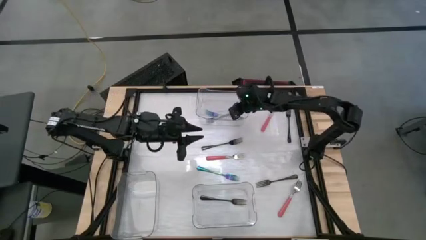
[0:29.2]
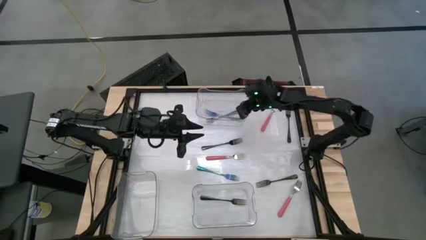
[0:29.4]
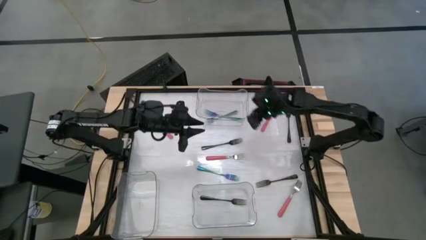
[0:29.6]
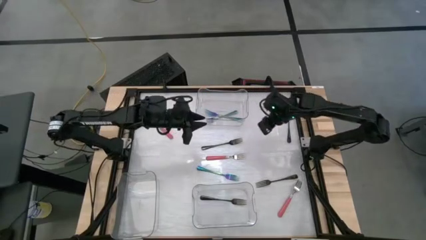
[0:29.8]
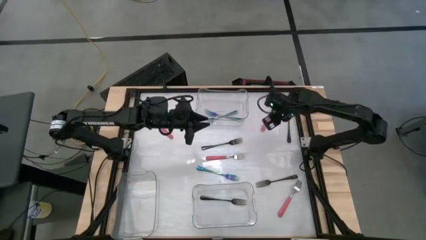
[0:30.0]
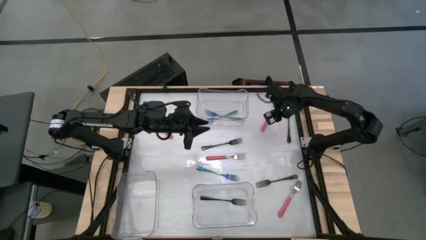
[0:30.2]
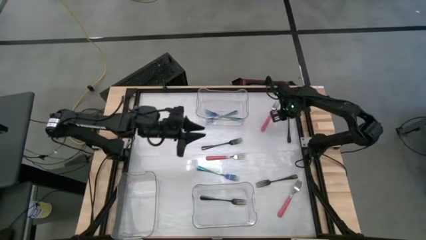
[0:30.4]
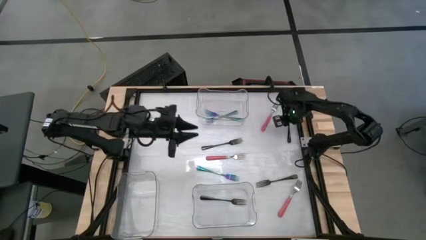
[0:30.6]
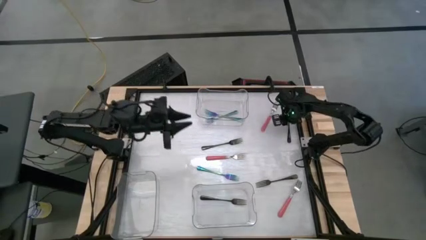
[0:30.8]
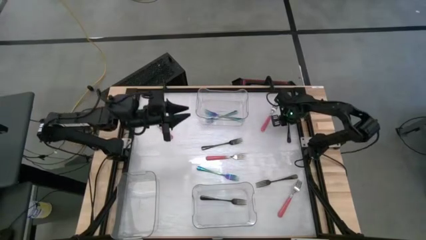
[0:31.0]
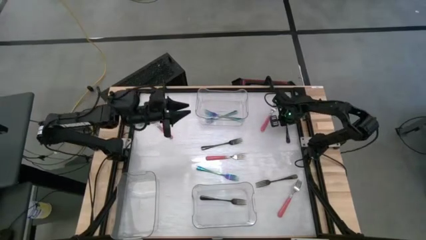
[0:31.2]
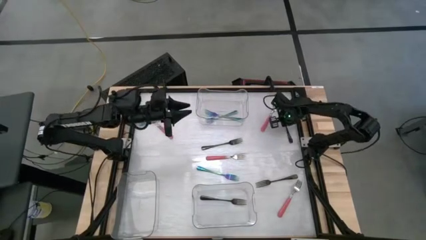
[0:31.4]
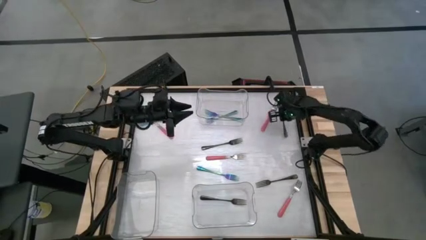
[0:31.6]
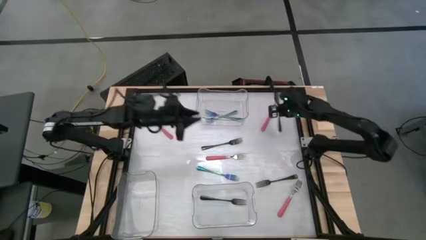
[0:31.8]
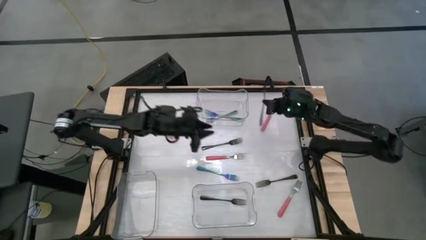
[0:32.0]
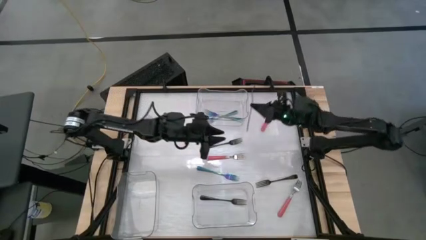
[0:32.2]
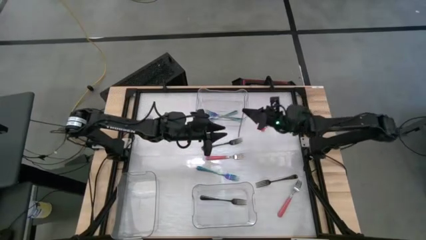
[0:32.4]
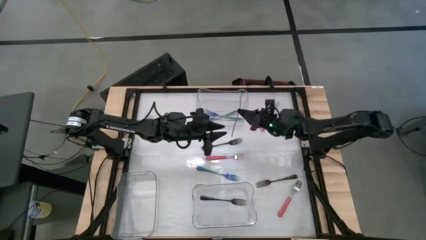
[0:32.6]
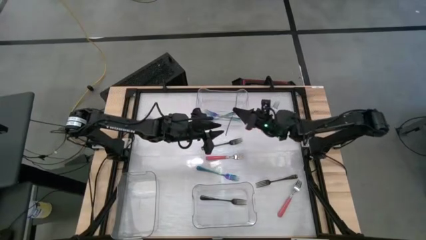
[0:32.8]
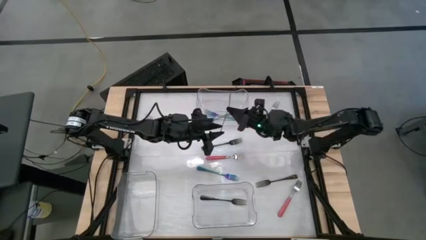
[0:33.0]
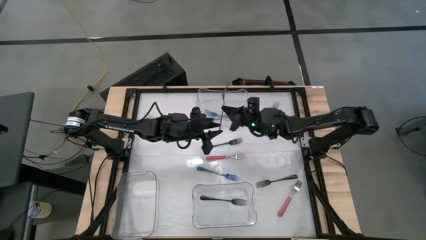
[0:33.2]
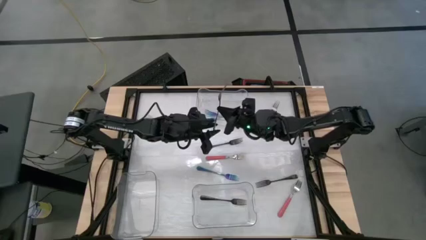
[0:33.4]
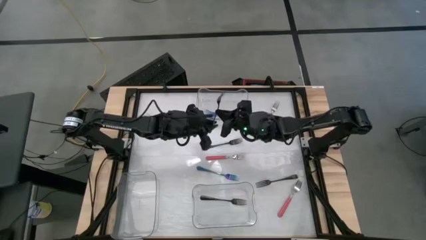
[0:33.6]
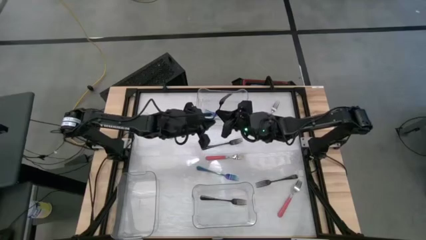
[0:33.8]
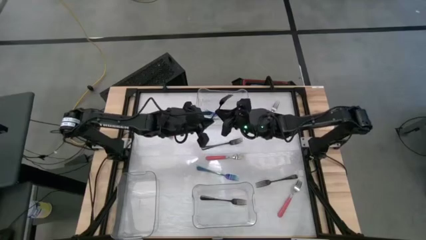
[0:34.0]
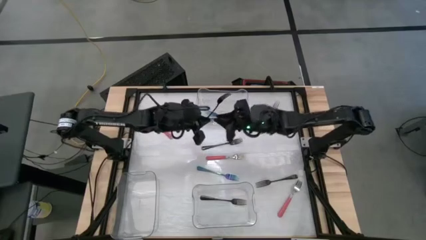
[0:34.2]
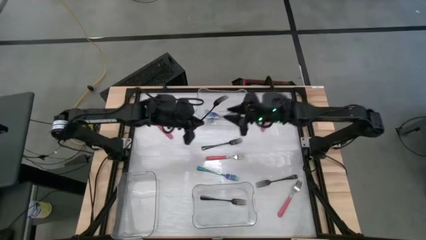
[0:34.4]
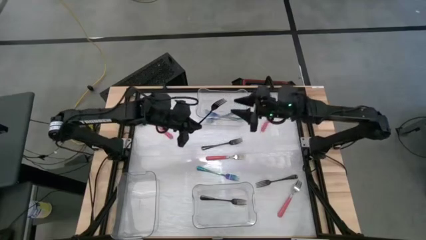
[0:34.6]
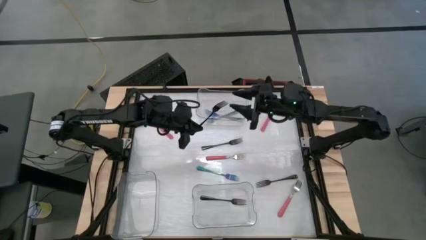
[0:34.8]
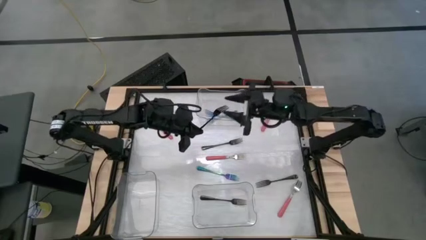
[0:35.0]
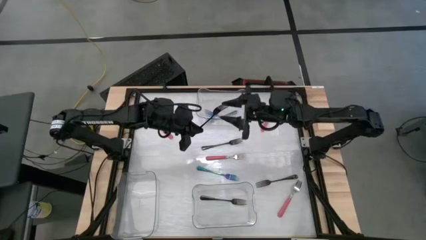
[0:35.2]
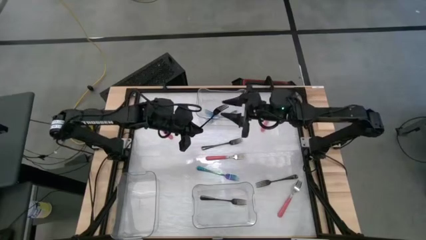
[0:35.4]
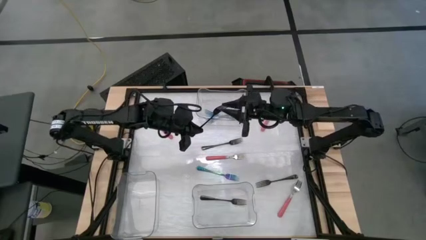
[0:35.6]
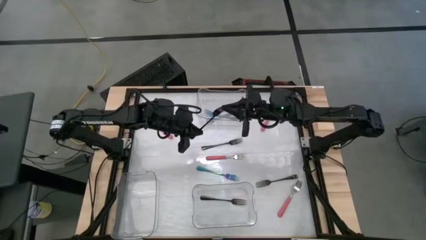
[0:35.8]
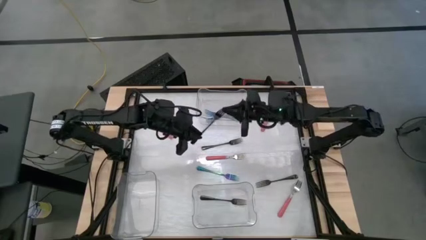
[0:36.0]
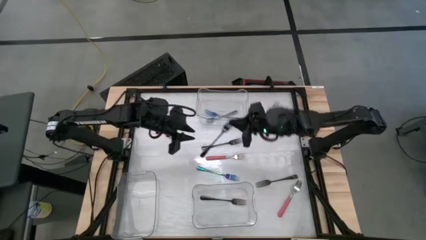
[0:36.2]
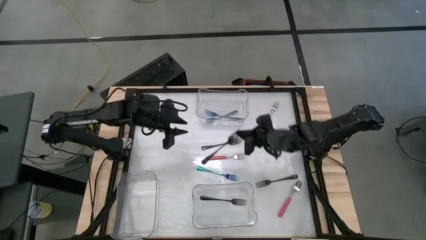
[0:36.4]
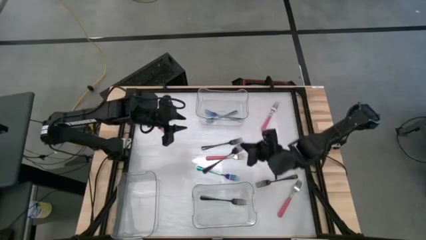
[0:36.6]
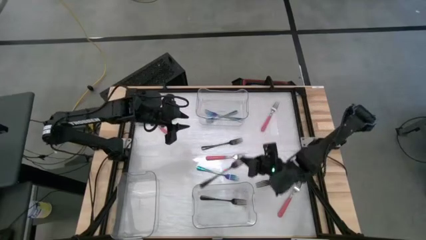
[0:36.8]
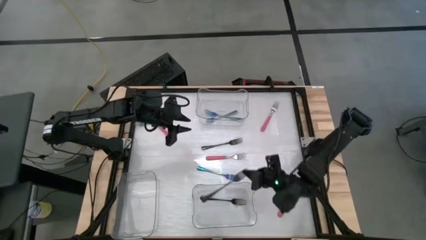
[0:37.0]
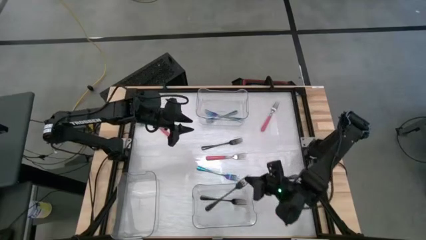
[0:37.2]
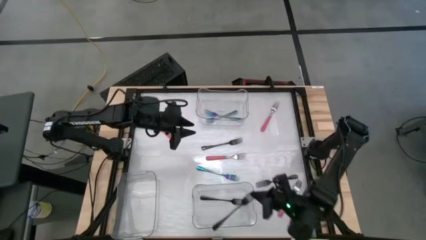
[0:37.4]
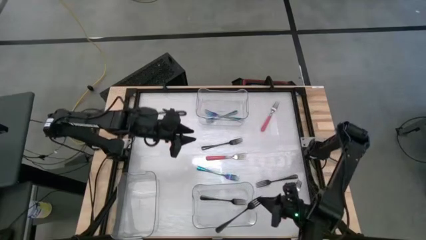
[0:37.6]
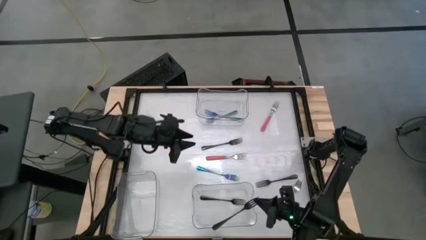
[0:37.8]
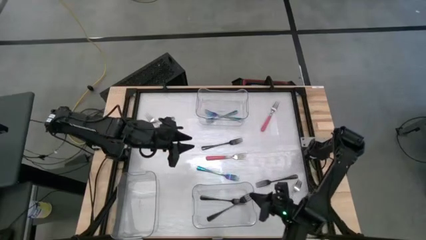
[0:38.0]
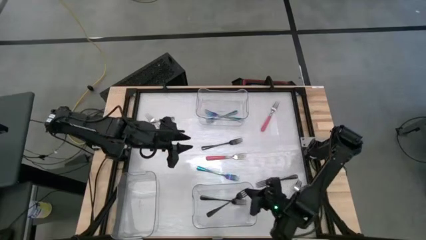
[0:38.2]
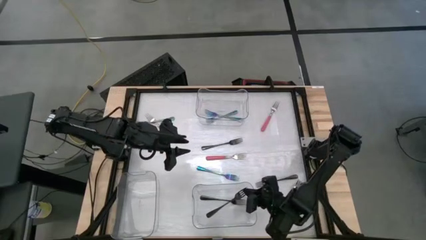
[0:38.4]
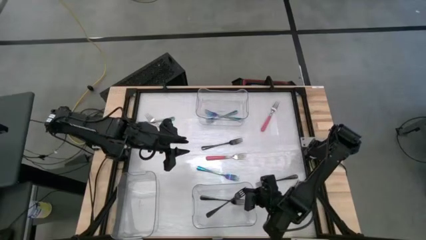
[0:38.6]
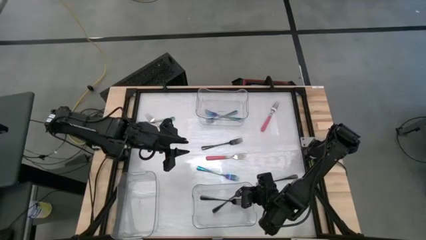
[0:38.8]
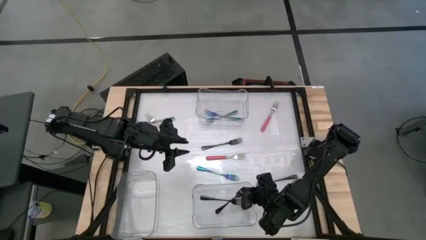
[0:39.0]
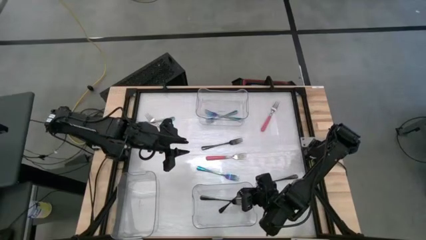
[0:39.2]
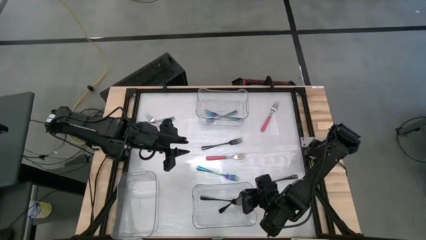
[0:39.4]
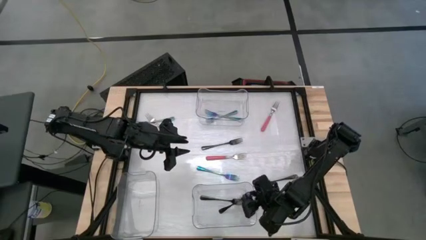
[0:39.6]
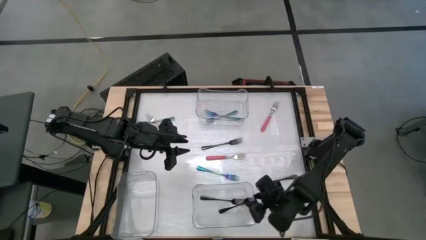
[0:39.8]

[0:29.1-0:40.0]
Task: Sort silverware by color (type)
Put the black fork into the bottom right transparent bin

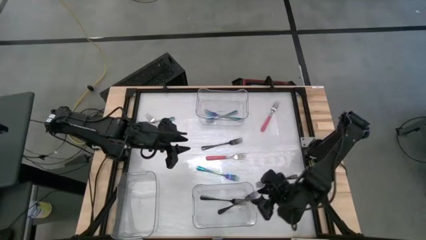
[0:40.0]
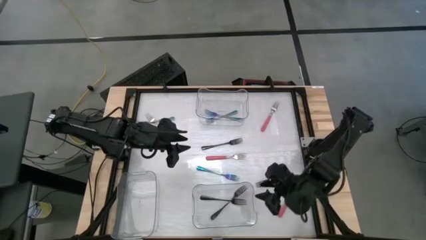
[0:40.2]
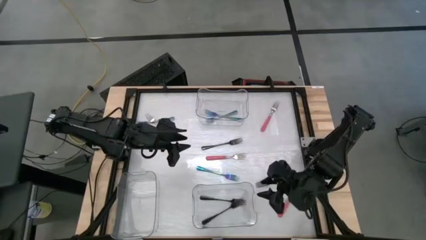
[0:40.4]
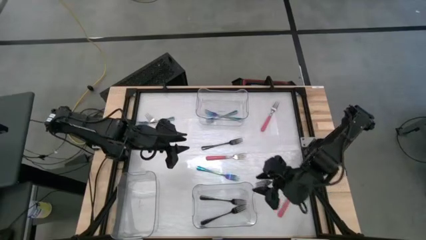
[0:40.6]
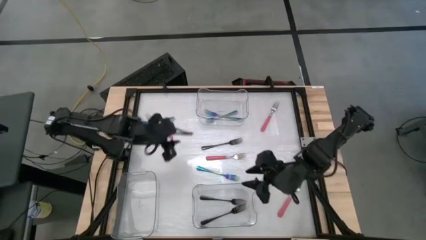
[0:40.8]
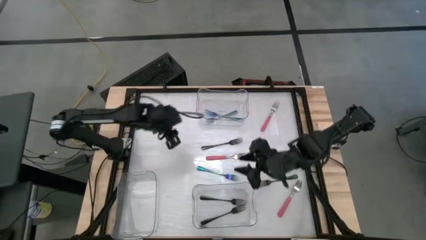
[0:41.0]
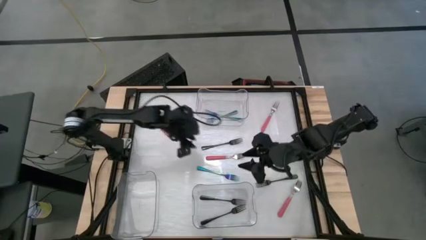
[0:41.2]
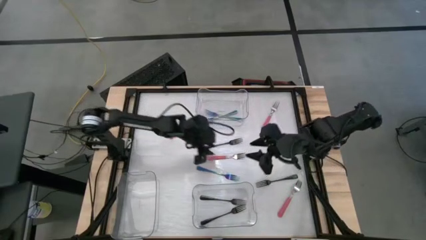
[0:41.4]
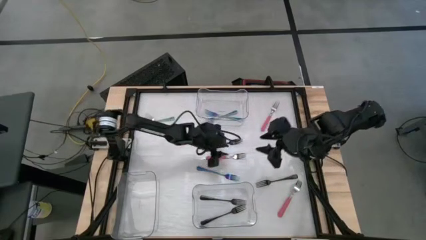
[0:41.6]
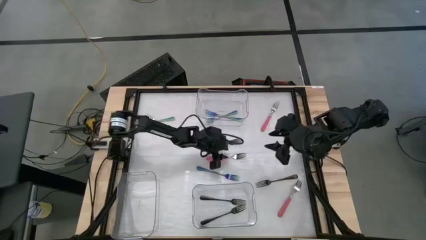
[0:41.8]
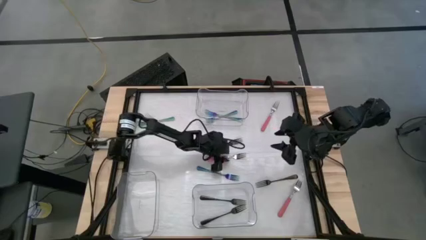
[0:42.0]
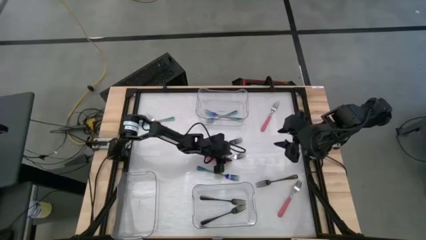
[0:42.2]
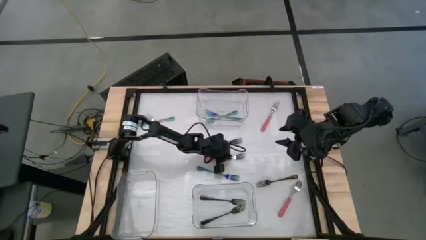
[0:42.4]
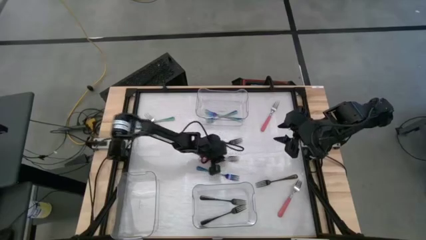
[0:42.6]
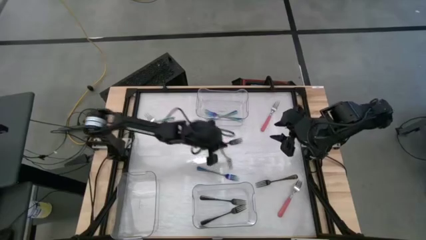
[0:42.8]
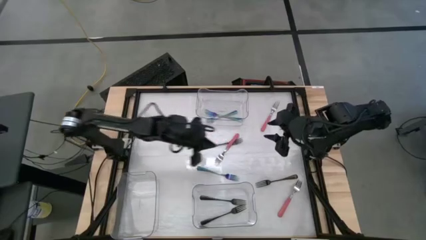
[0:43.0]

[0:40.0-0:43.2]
Put the pink fork into the bottom left transparent bin
